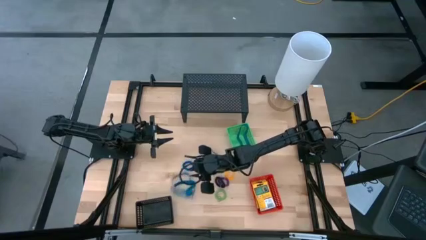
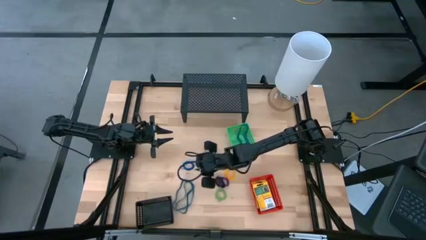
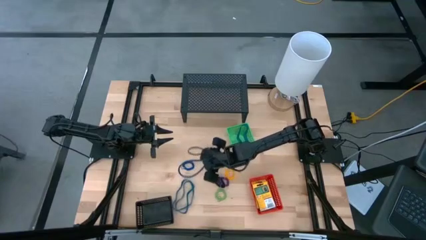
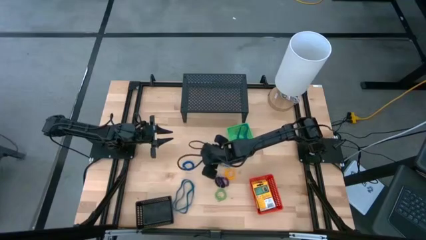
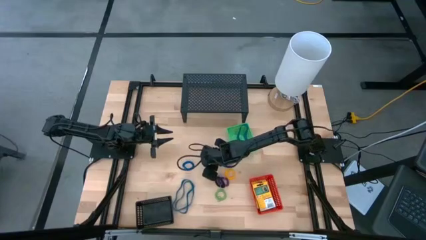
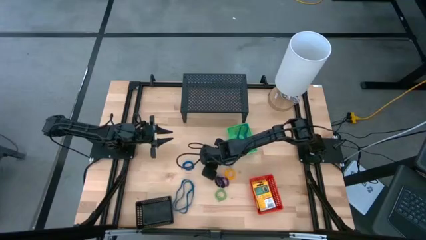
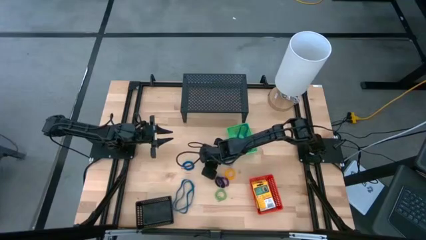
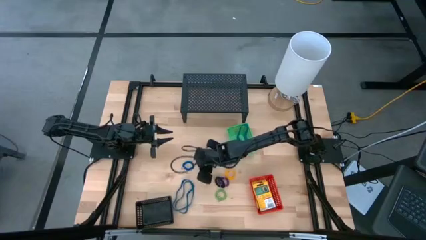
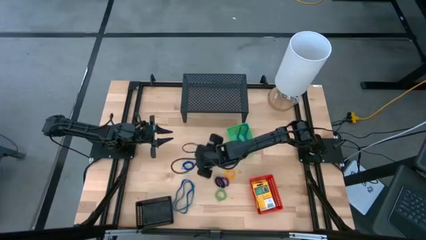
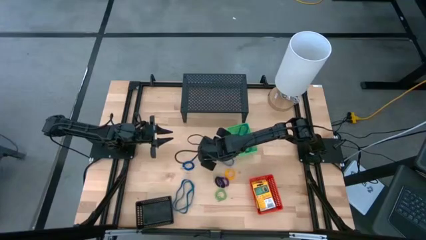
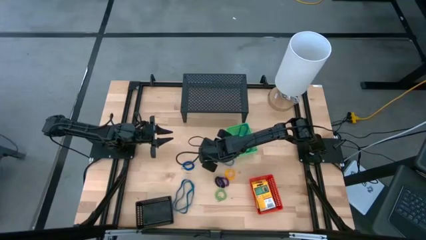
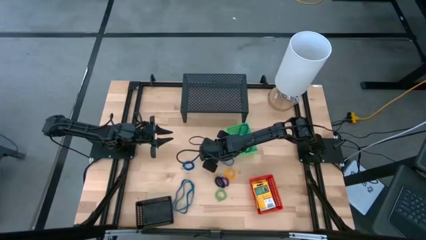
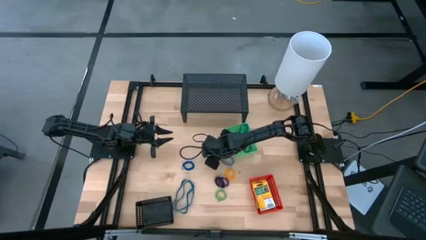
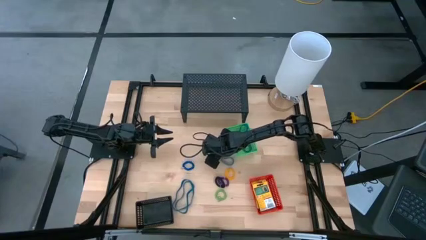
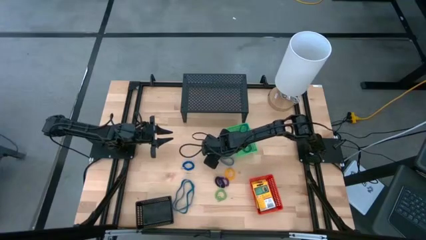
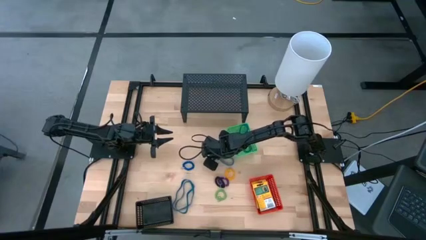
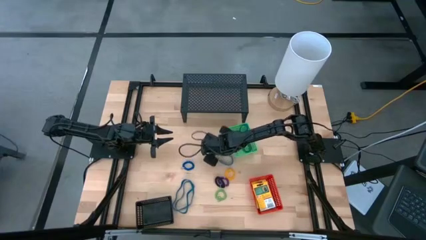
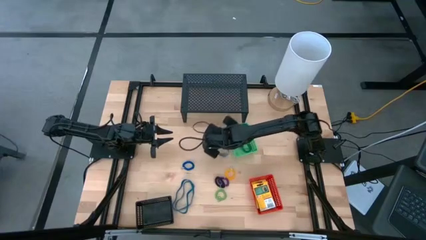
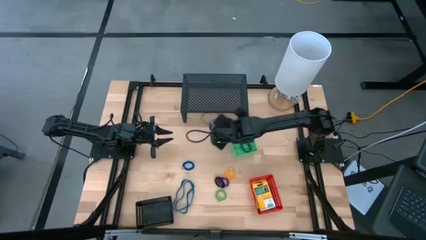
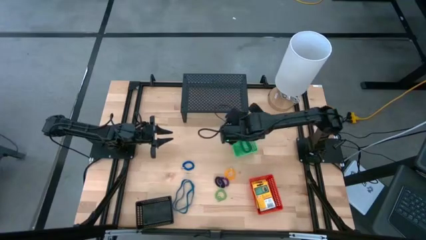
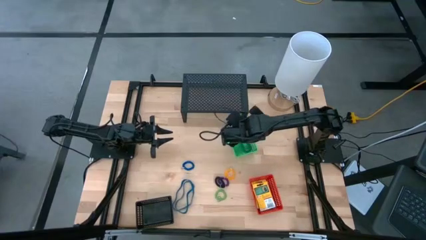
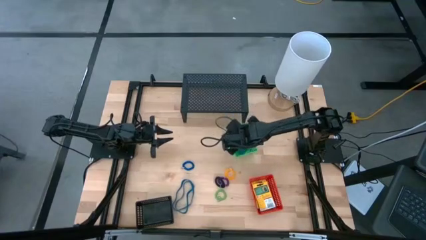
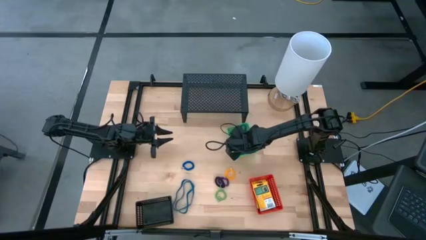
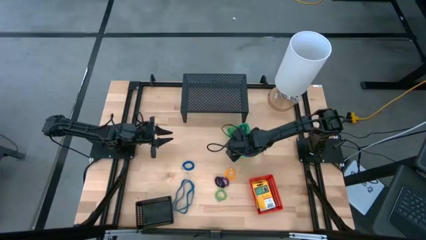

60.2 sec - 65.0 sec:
Task: Pick & Place Office Desk Supplies
Put the blue rubber band into the green basket

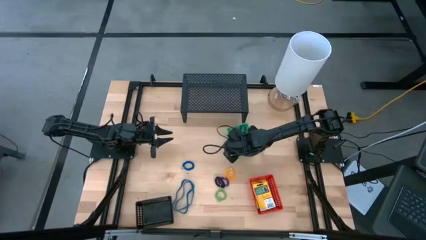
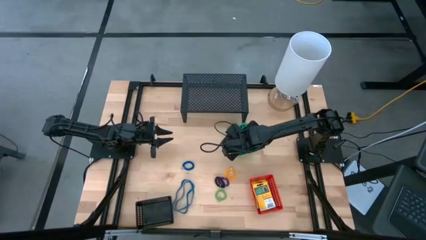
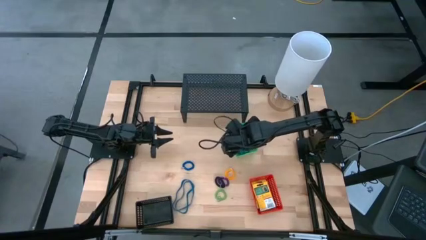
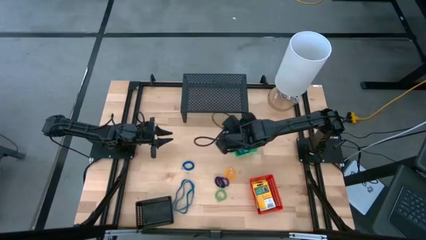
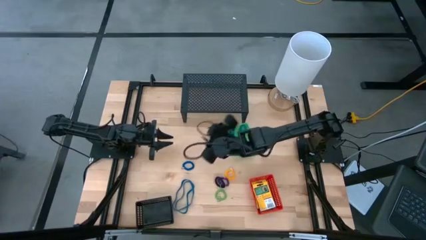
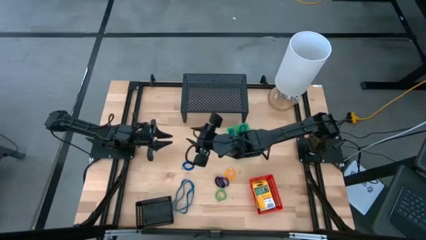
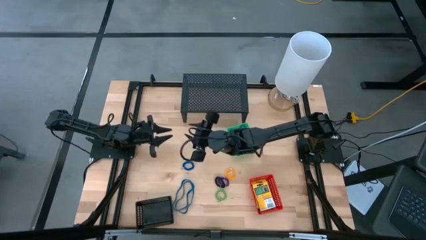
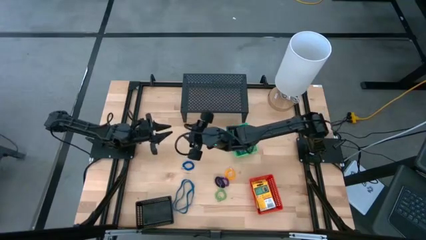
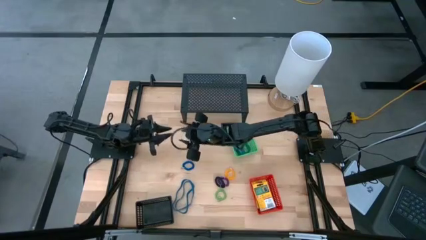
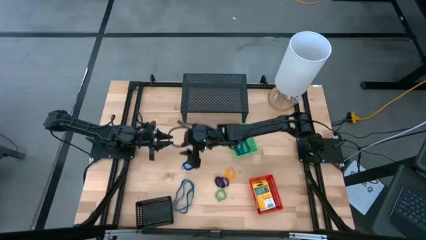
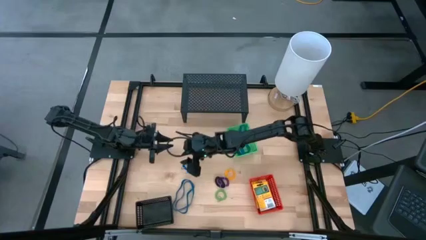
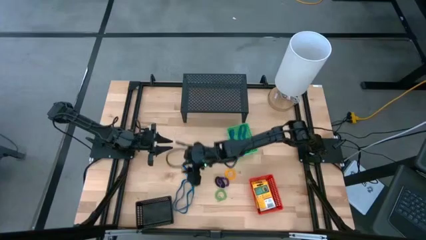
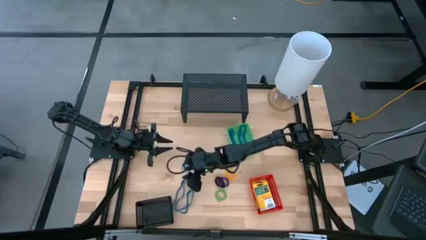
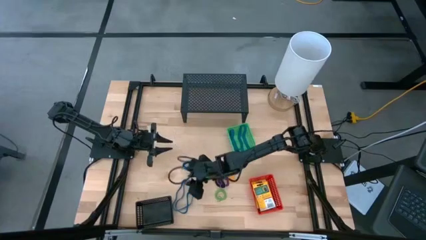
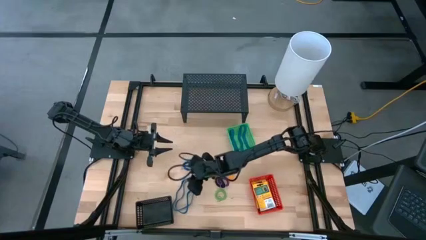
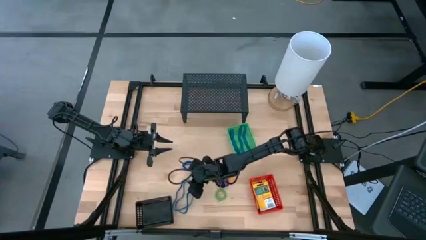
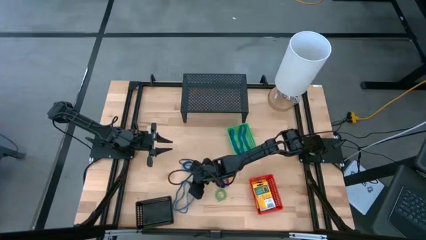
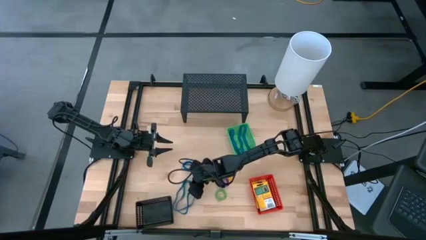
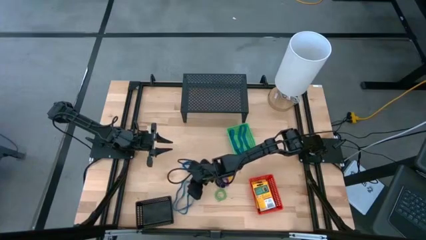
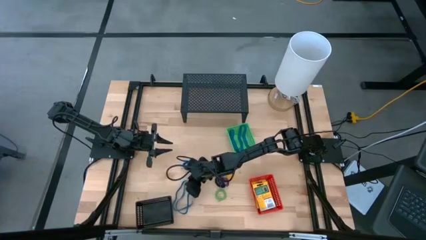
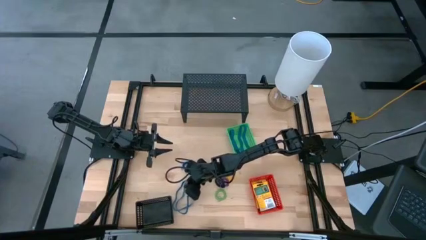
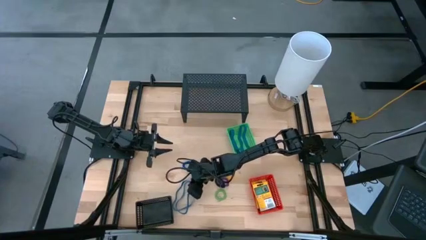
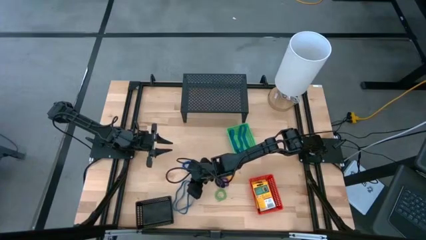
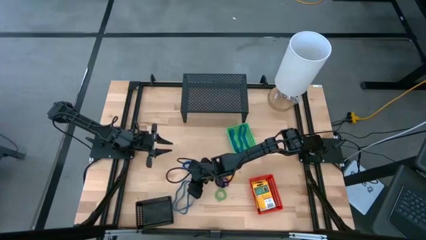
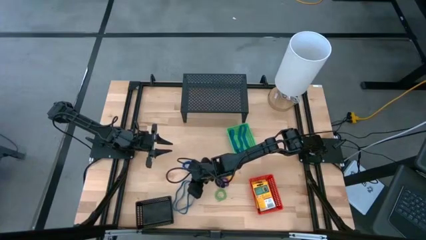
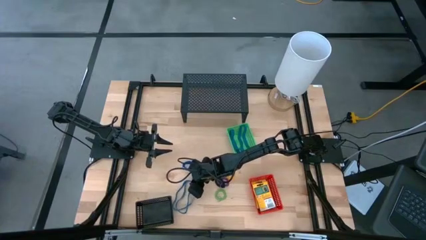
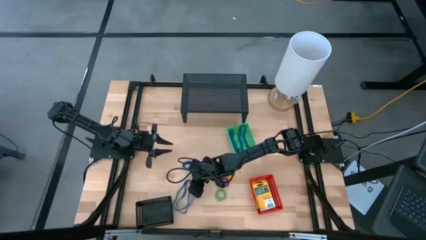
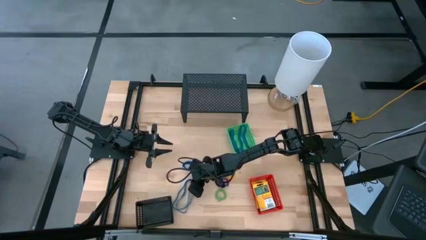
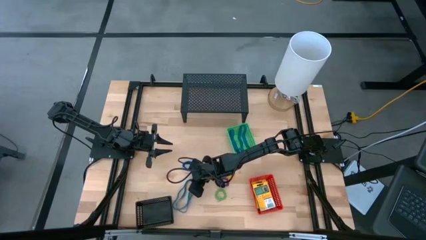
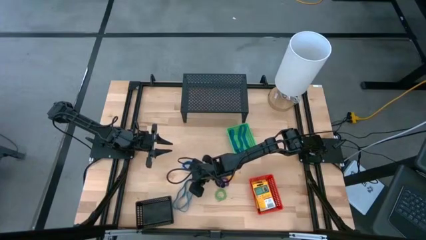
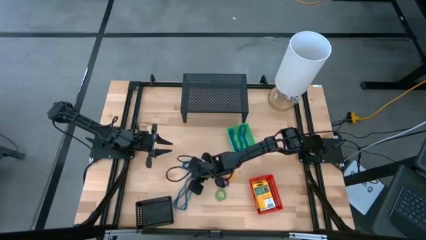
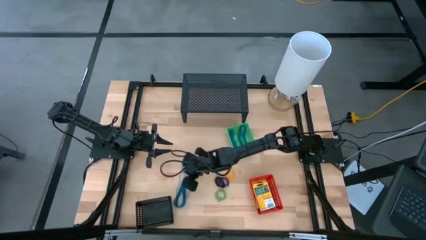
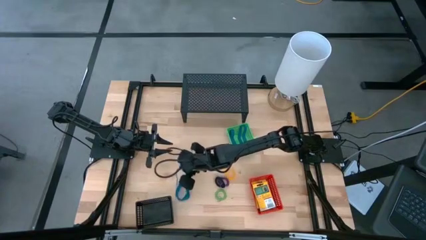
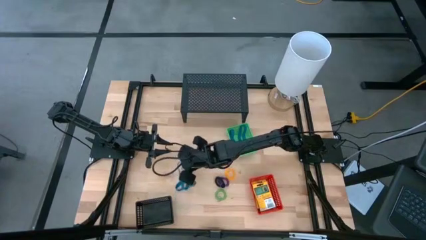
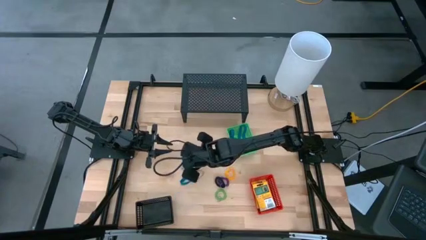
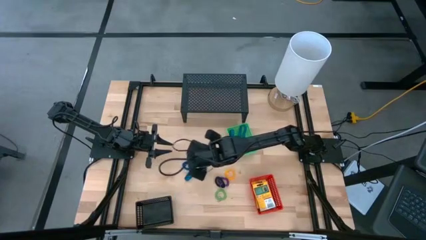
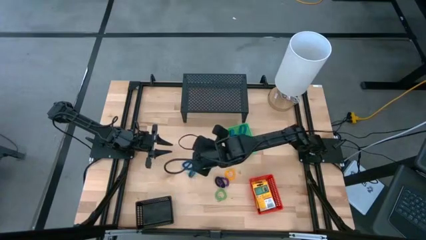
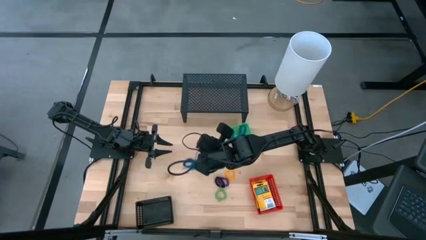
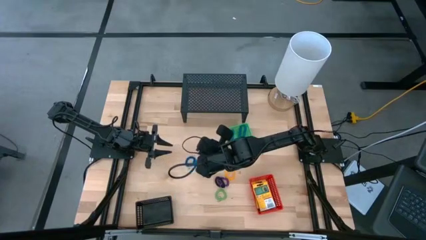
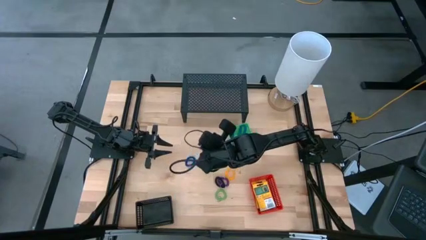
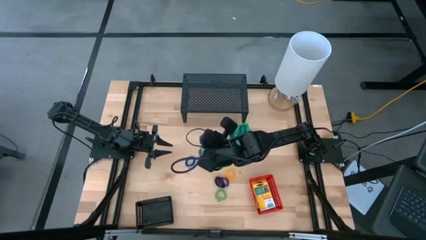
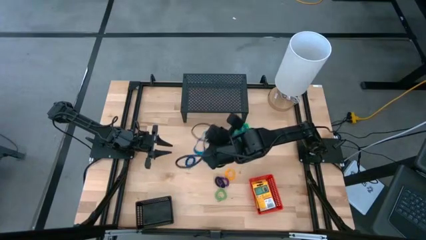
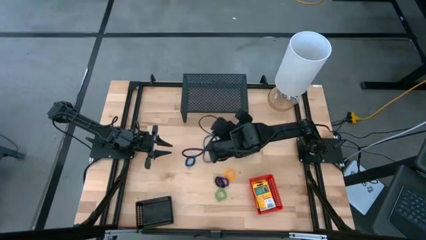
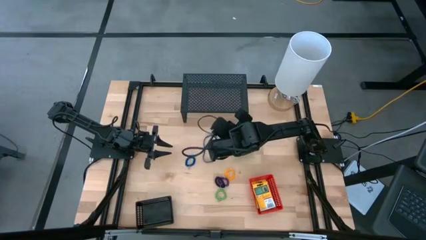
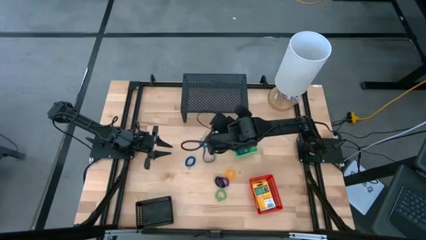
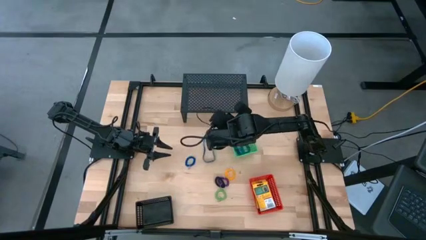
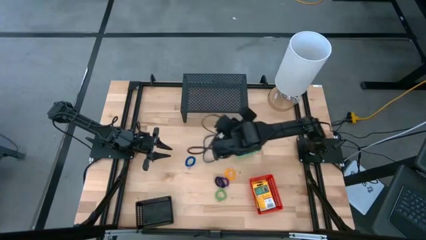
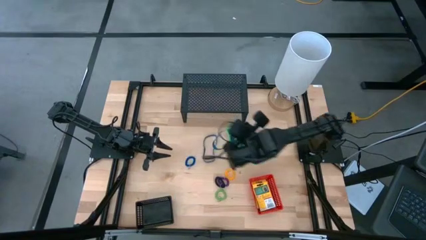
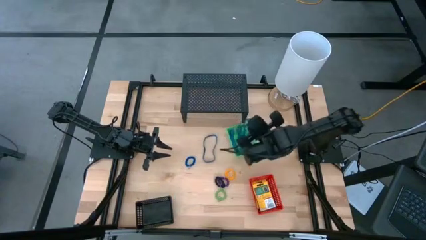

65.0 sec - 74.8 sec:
Put the blue rubber band into the green basket
